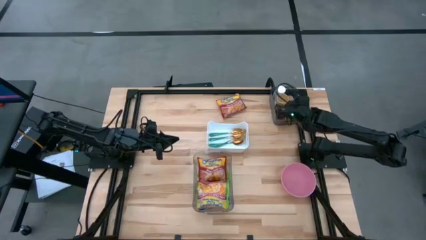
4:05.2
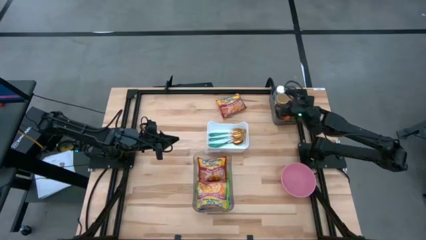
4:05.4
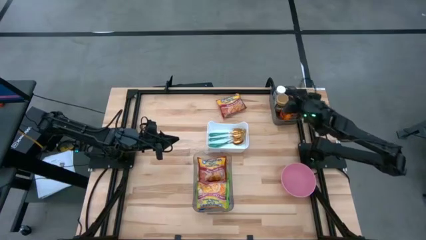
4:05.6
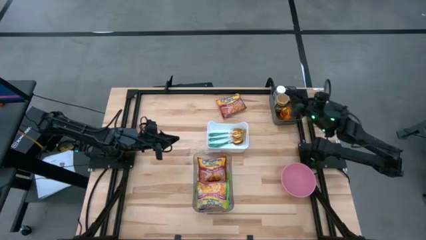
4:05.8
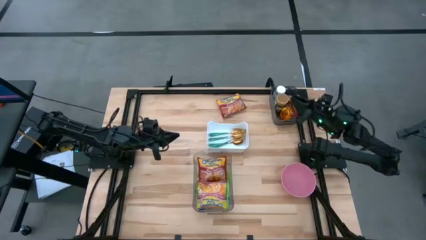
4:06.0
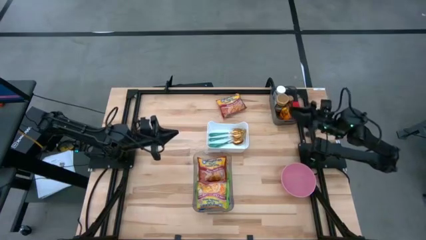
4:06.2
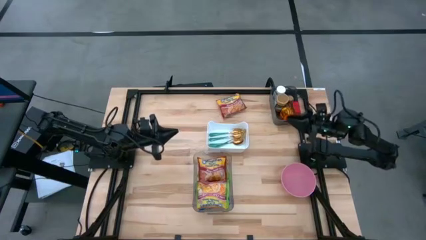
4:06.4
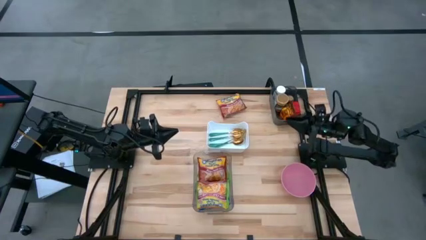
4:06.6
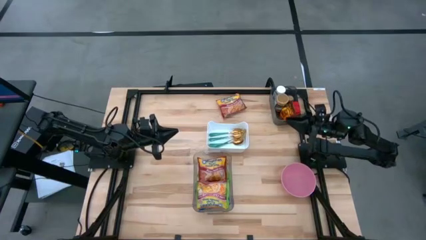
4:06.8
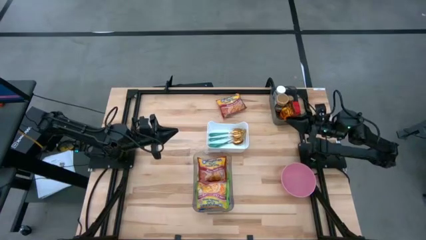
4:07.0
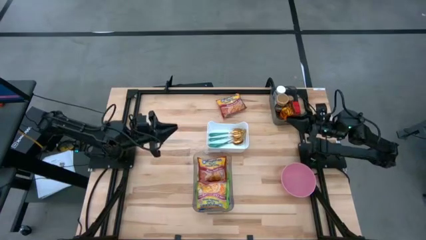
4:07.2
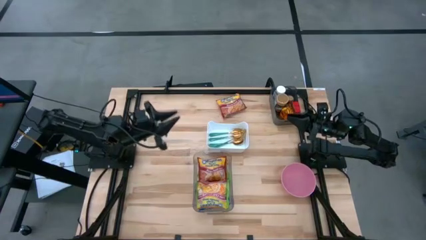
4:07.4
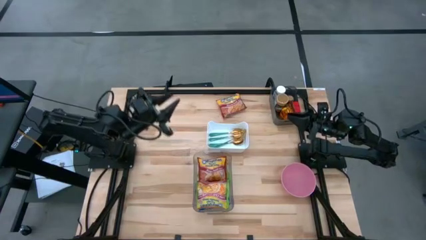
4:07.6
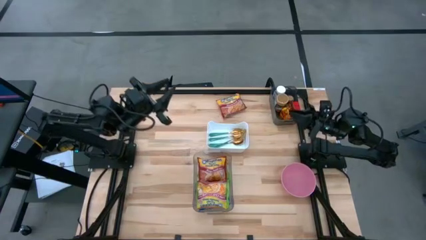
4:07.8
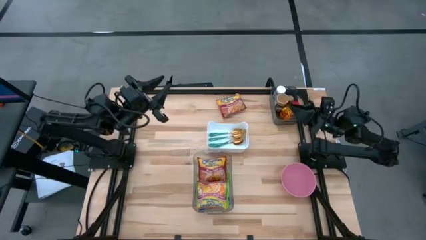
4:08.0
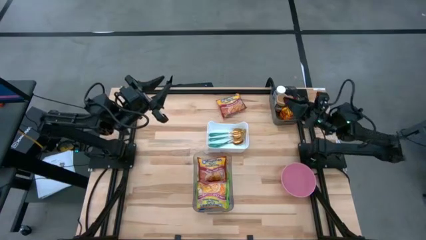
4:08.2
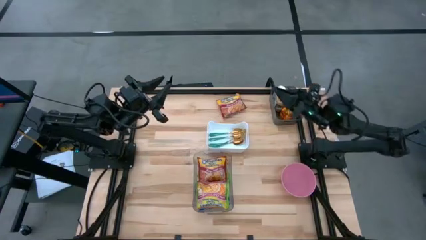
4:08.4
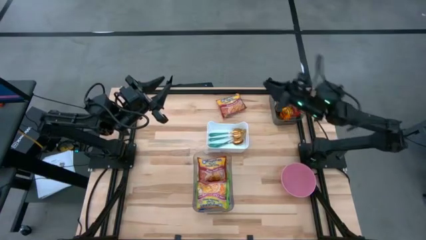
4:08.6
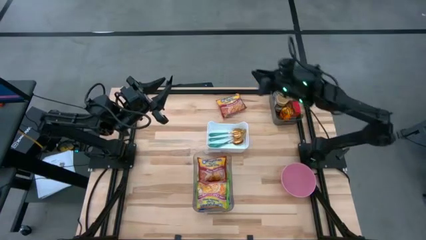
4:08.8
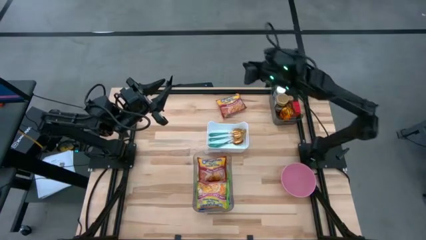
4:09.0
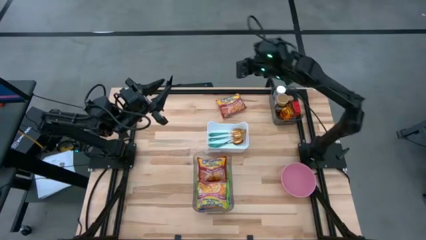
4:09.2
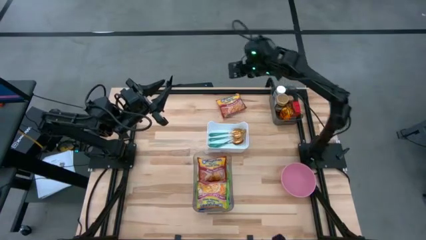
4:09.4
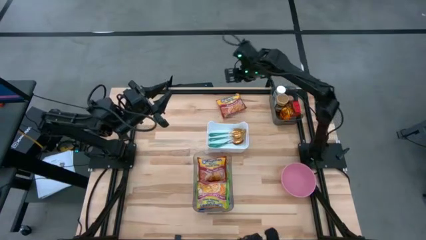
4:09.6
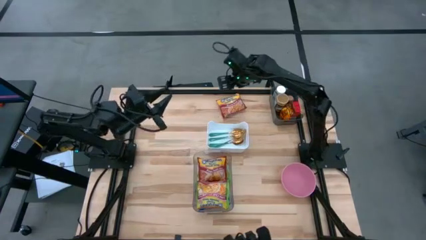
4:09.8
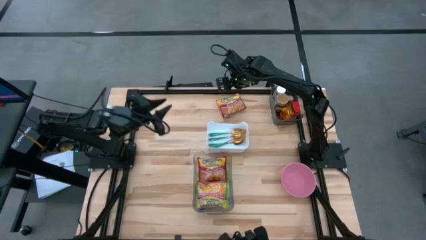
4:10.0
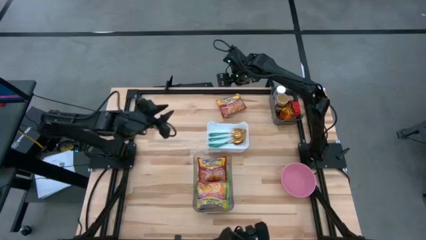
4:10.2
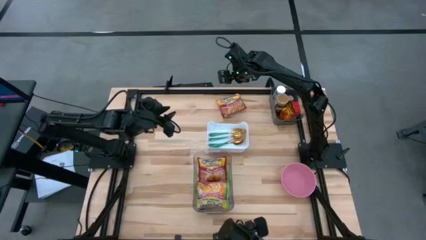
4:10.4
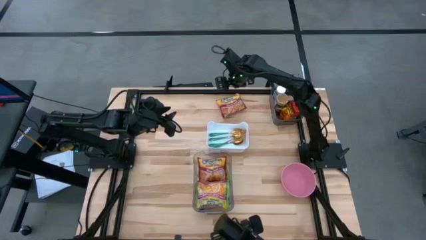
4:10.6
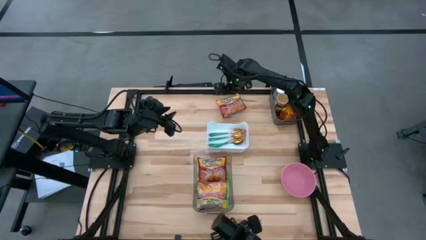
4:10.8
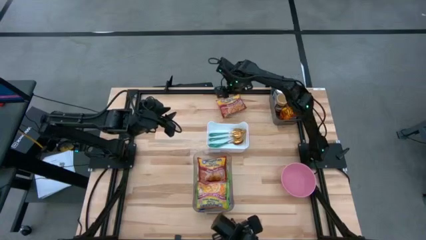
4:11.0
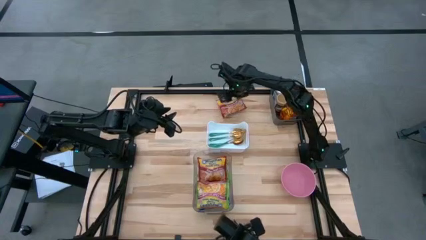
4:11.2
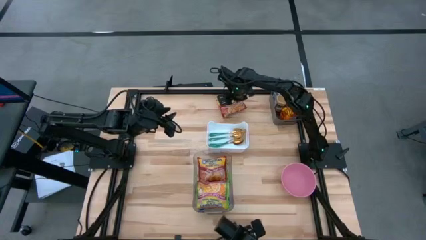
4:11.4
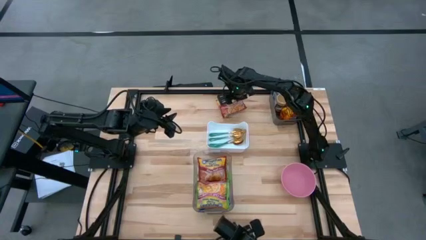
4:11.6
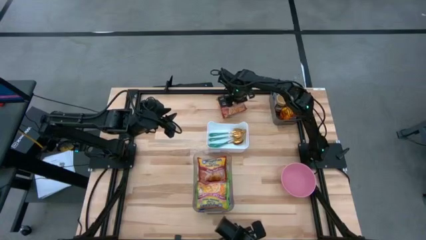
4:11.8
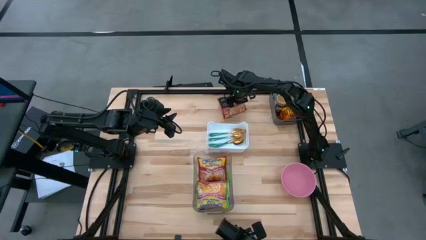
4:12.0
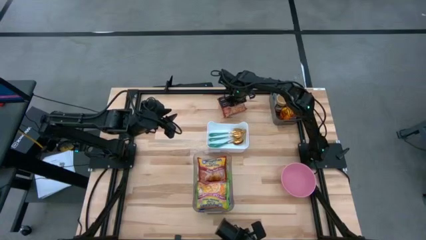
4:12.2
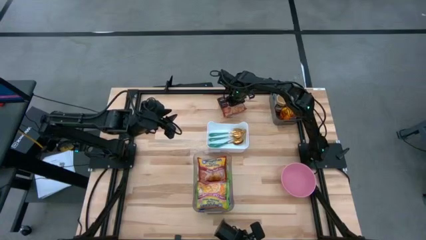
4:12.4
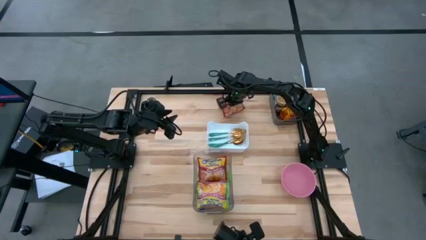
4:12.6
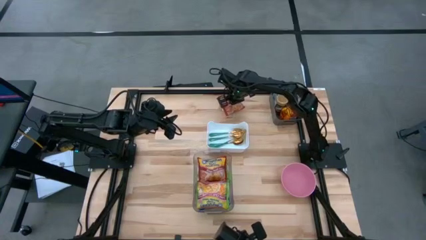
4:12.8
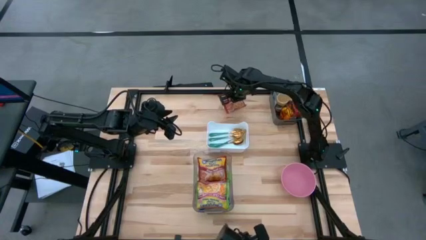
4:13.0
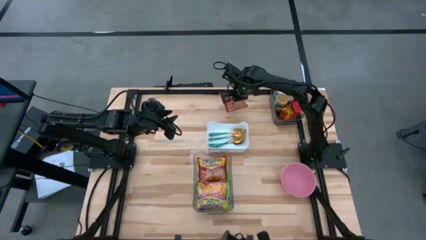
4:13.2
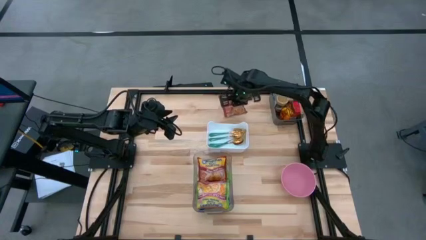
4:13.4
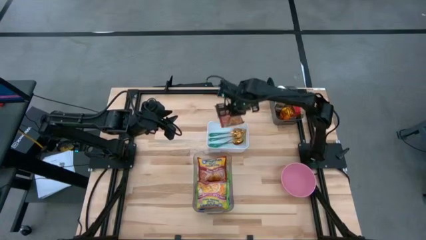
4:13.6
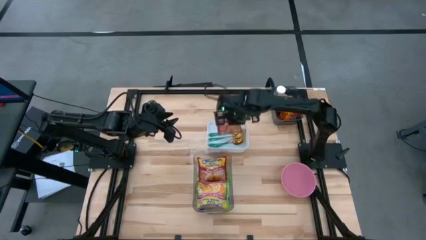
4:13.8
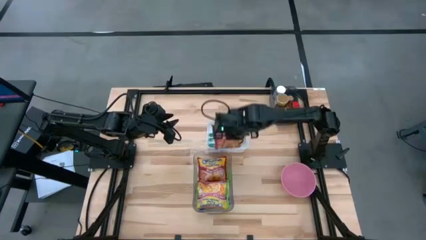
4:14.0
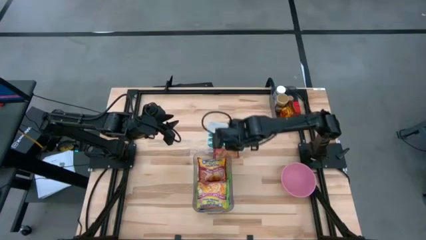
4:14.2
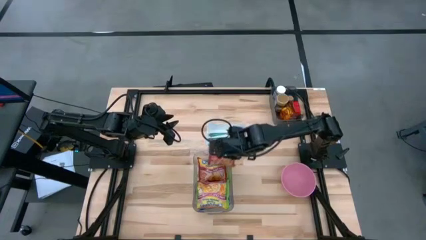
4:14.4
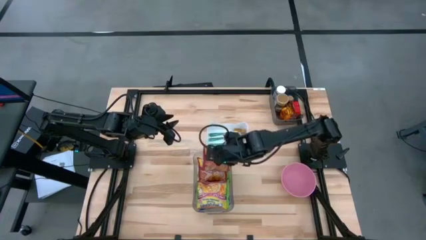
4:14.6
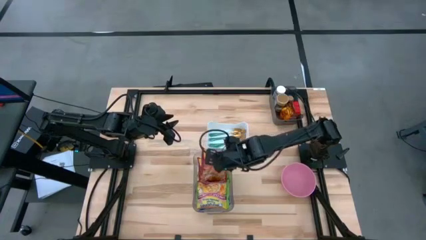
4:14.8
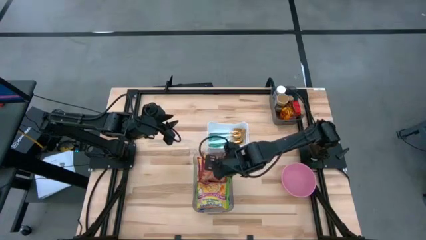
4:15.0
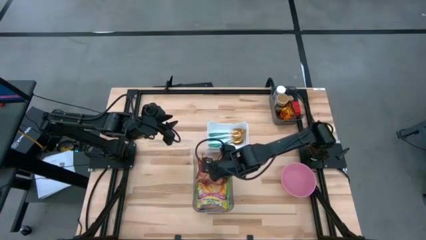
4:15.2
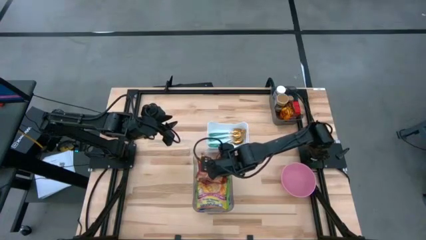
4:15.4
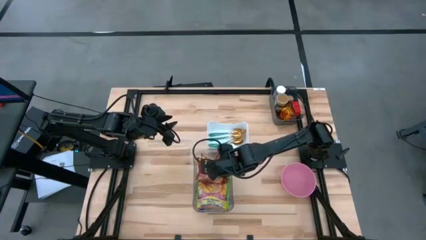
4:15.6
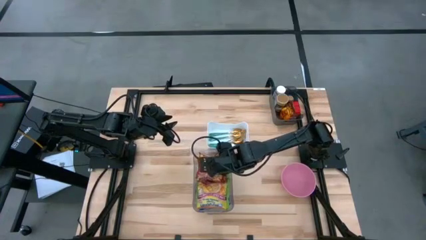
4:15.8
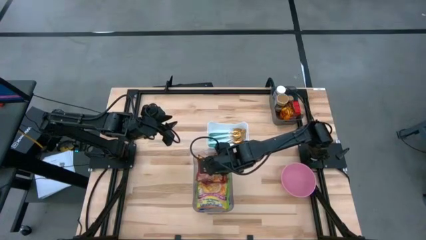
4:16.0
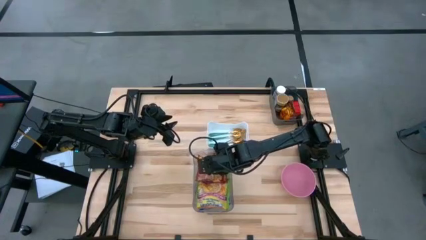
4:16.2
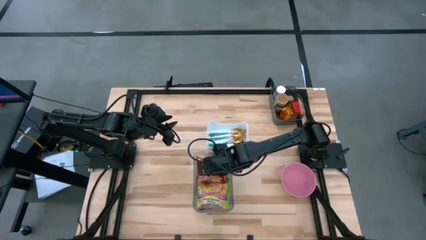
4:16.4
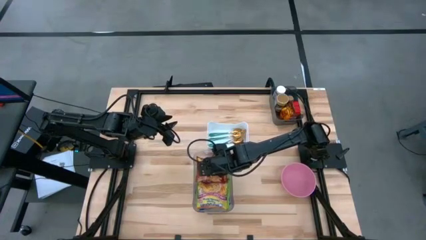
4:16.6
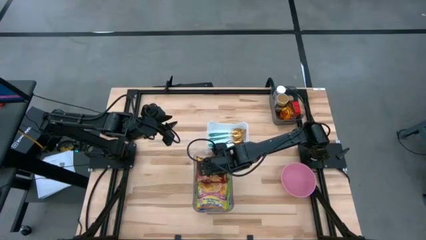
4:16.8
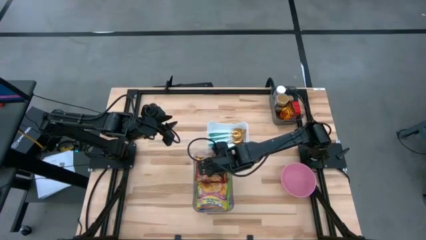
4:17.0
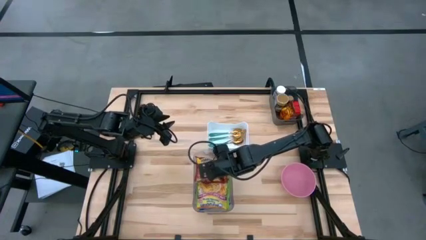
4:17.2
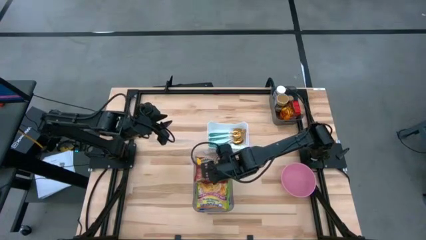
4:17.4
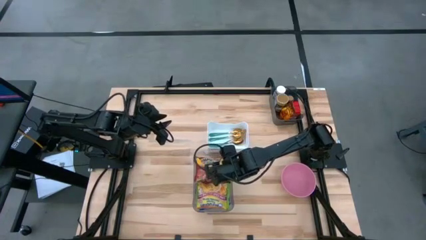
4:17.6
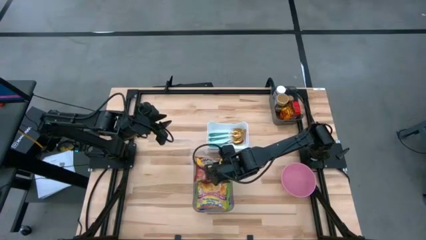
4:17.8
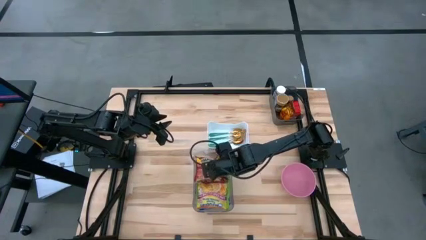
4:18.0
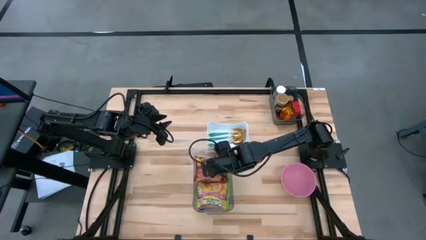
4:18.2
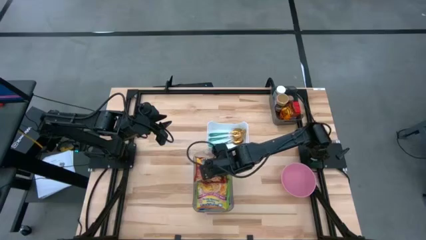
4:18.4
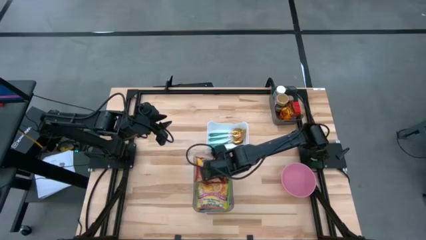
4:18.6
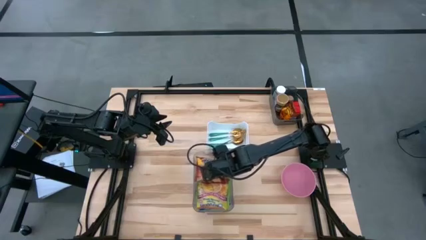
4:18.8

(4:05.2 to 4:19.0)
Task: Pick & Place Food Item
Put the red noodle pack into the transparent bin
